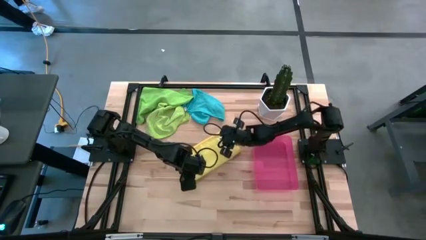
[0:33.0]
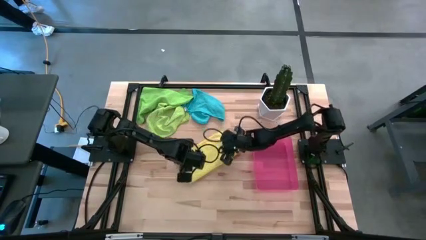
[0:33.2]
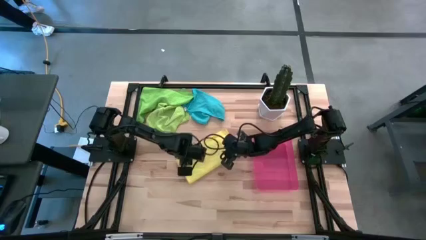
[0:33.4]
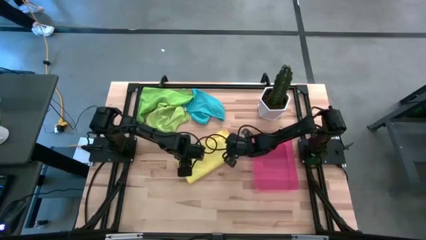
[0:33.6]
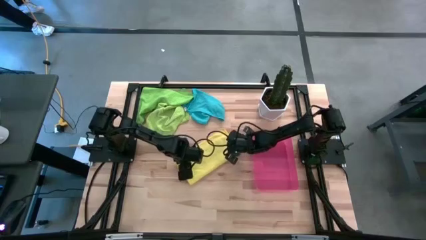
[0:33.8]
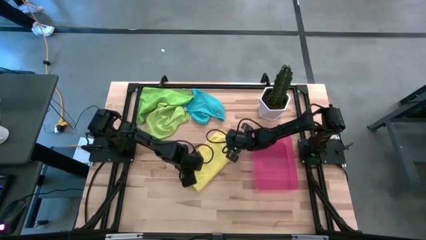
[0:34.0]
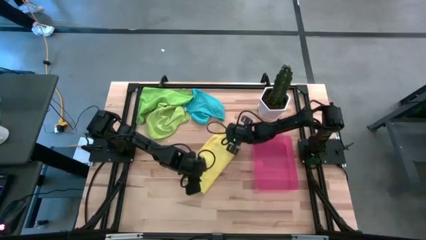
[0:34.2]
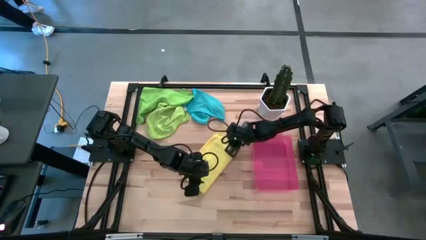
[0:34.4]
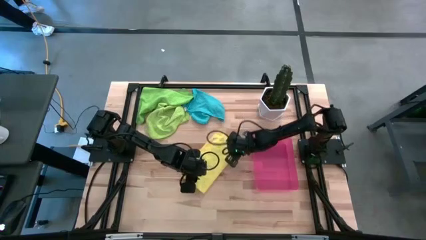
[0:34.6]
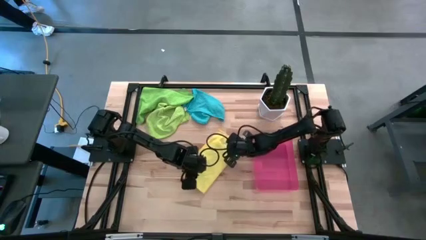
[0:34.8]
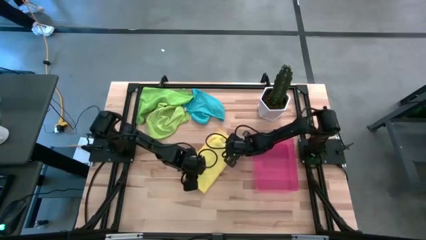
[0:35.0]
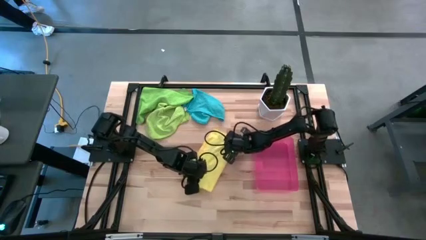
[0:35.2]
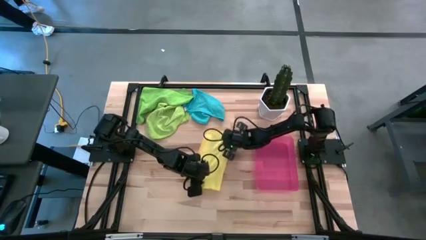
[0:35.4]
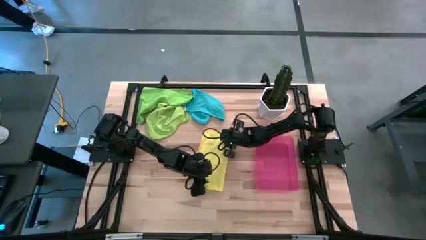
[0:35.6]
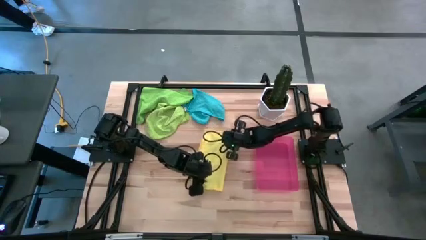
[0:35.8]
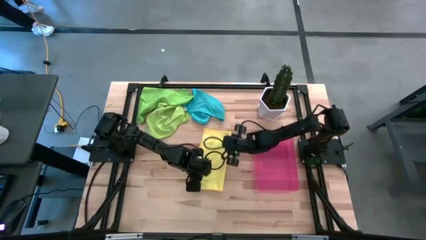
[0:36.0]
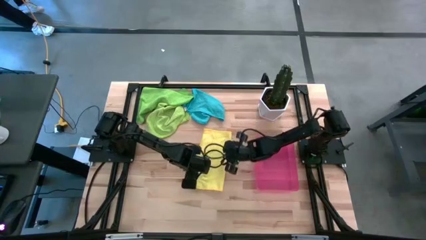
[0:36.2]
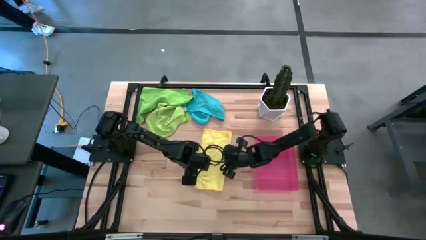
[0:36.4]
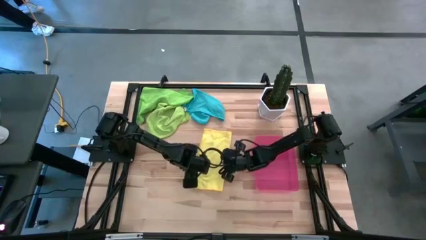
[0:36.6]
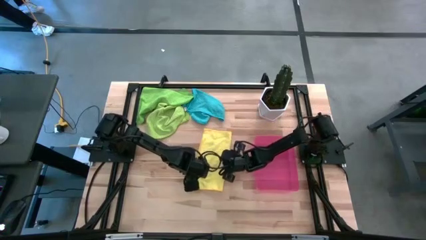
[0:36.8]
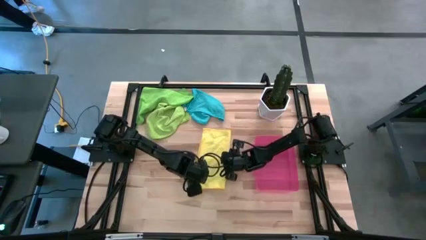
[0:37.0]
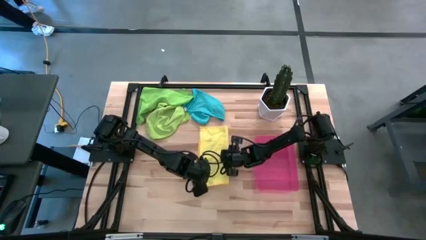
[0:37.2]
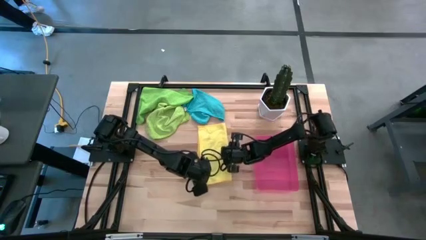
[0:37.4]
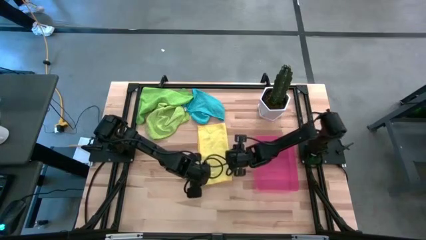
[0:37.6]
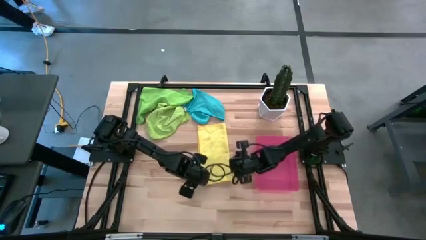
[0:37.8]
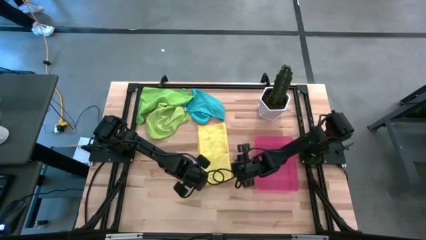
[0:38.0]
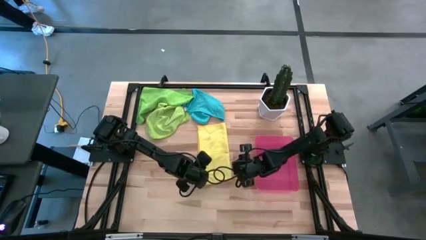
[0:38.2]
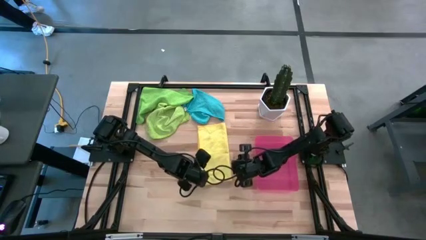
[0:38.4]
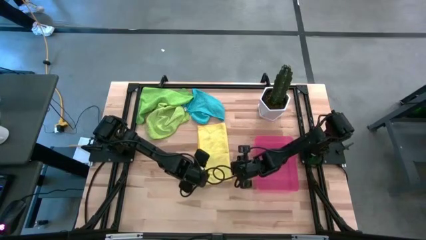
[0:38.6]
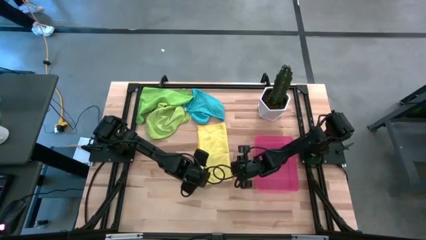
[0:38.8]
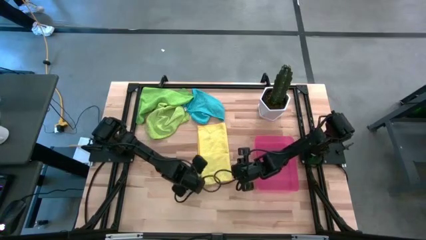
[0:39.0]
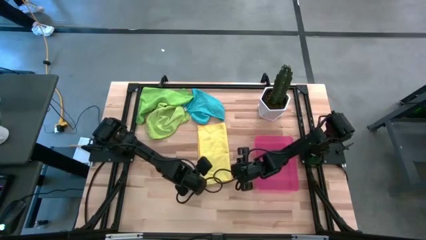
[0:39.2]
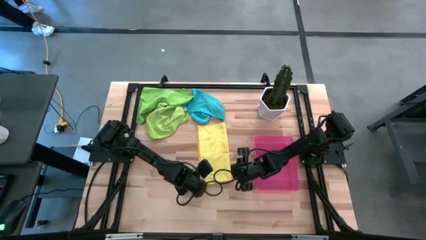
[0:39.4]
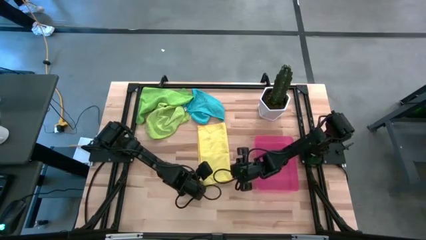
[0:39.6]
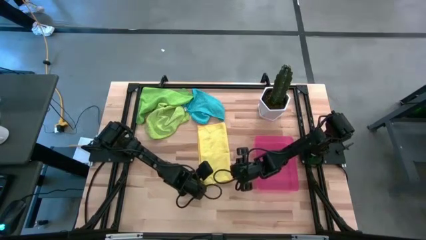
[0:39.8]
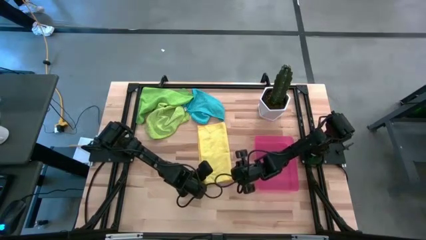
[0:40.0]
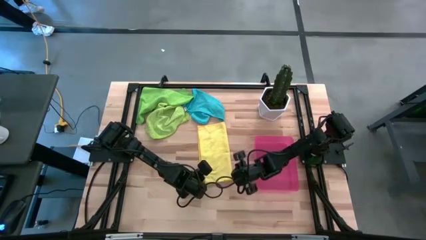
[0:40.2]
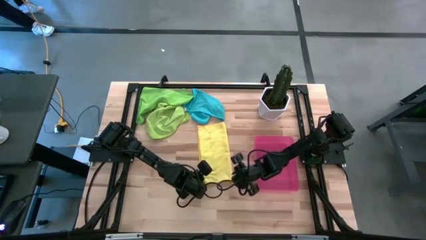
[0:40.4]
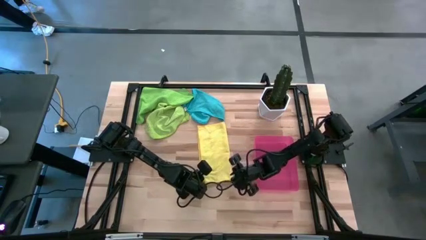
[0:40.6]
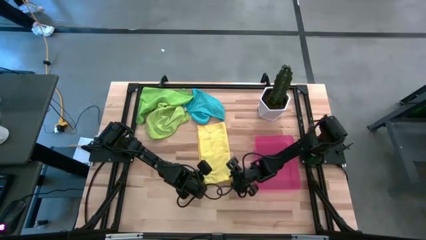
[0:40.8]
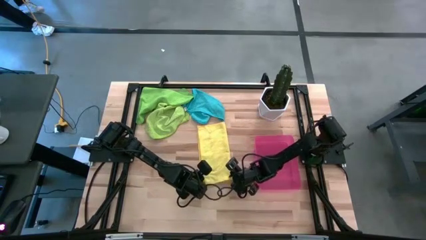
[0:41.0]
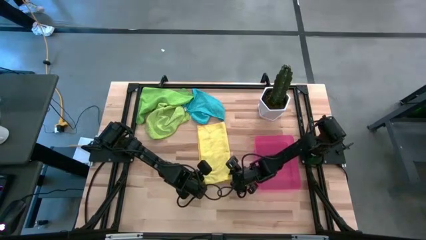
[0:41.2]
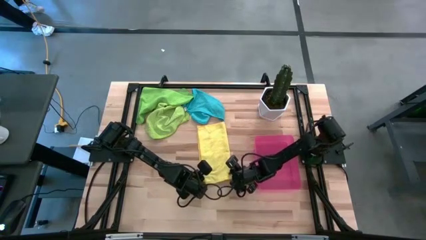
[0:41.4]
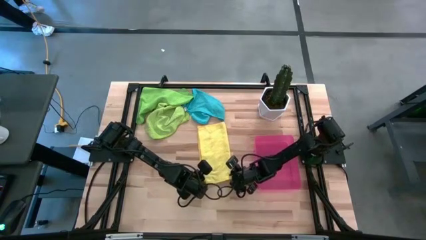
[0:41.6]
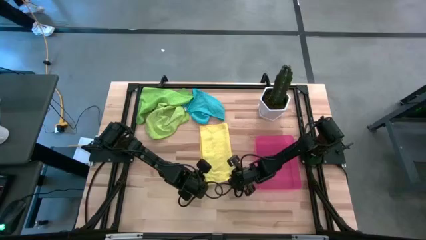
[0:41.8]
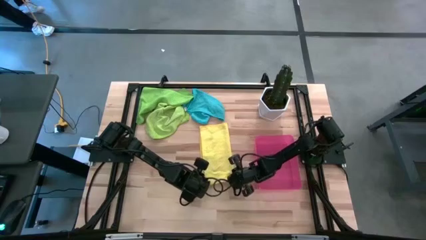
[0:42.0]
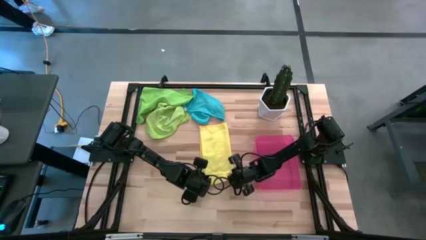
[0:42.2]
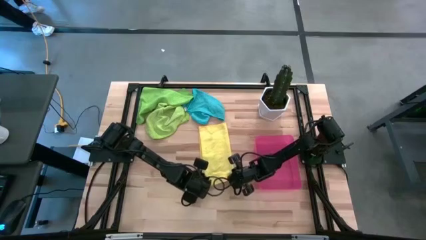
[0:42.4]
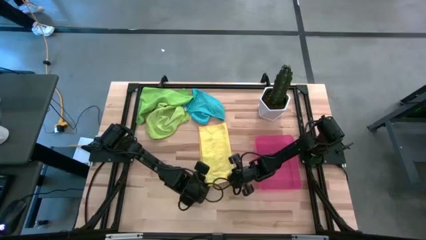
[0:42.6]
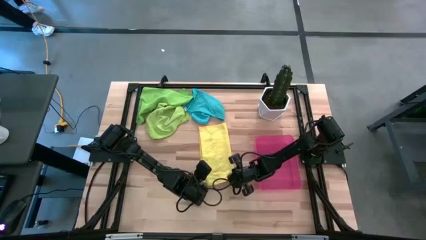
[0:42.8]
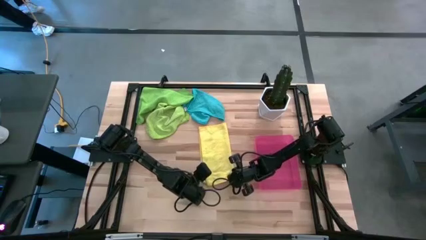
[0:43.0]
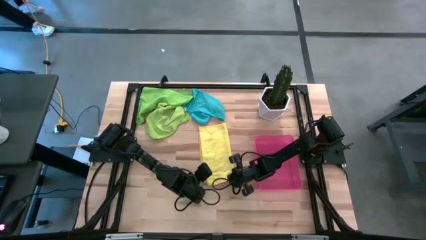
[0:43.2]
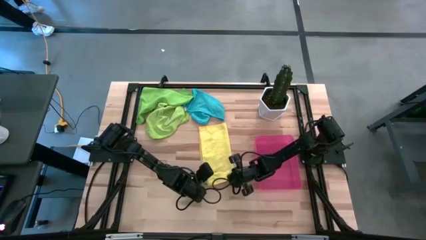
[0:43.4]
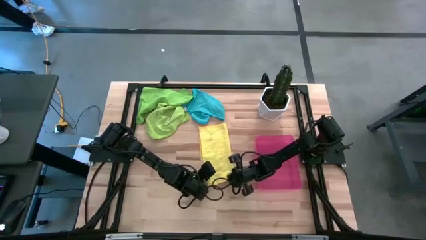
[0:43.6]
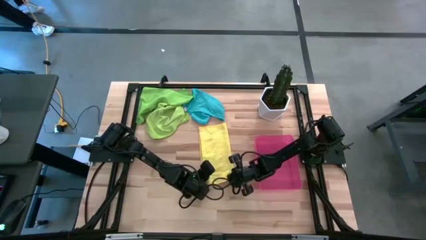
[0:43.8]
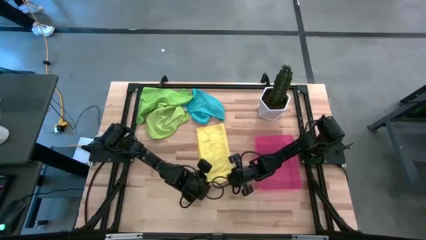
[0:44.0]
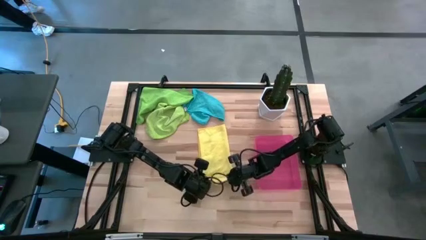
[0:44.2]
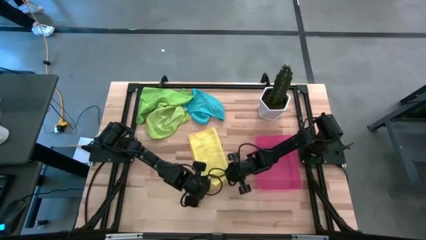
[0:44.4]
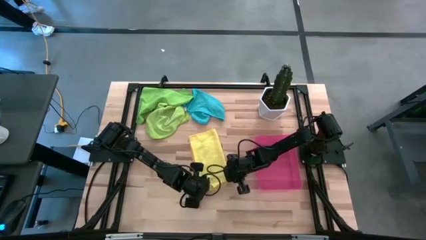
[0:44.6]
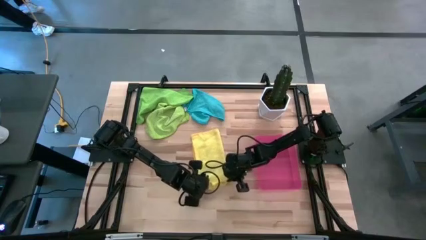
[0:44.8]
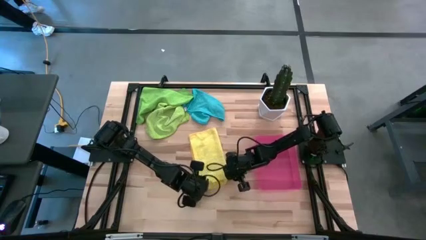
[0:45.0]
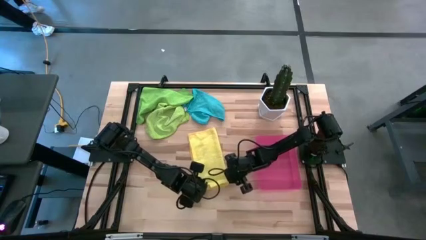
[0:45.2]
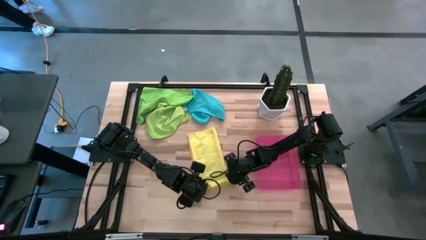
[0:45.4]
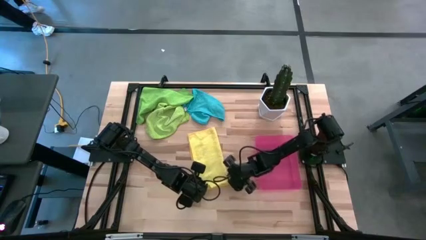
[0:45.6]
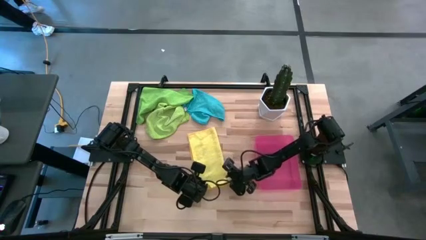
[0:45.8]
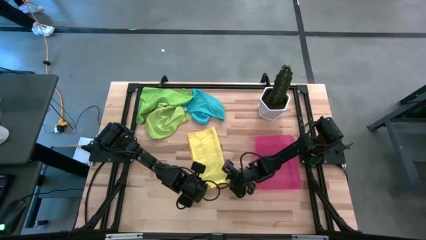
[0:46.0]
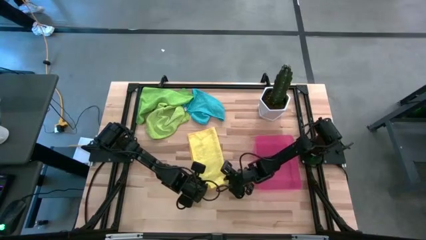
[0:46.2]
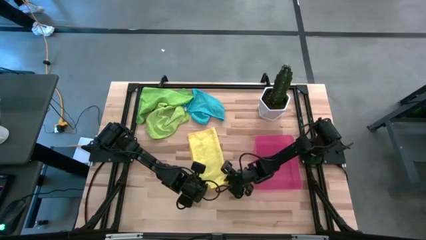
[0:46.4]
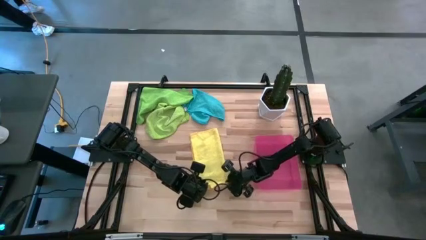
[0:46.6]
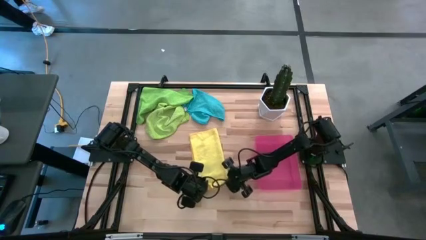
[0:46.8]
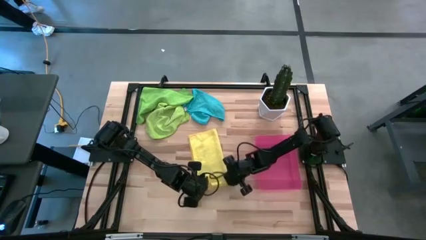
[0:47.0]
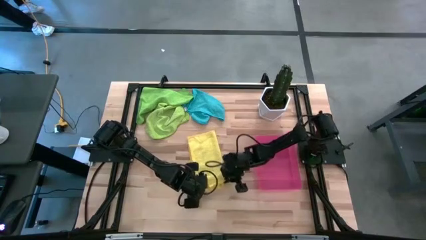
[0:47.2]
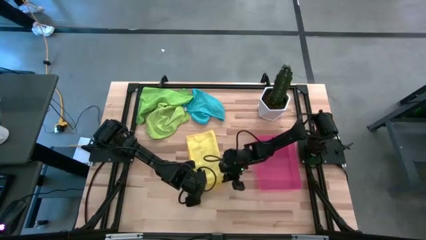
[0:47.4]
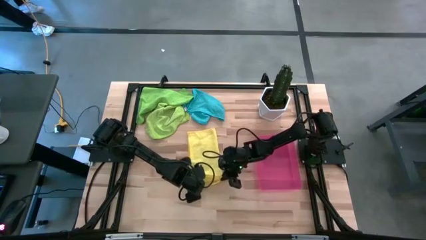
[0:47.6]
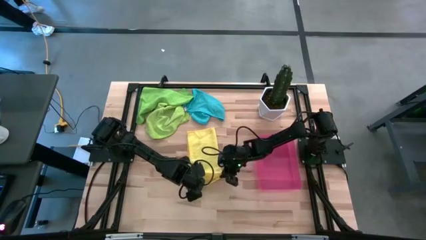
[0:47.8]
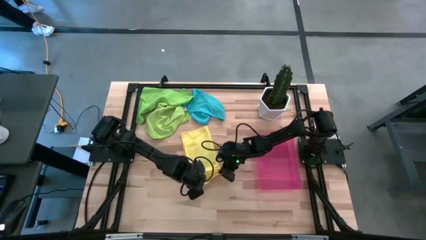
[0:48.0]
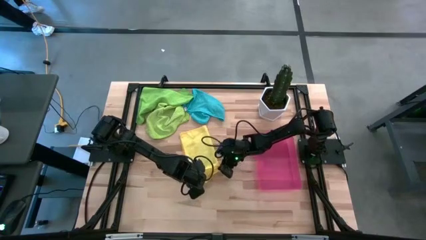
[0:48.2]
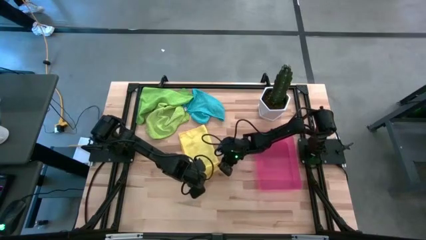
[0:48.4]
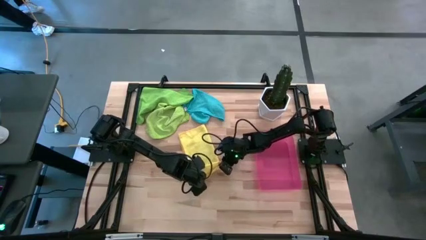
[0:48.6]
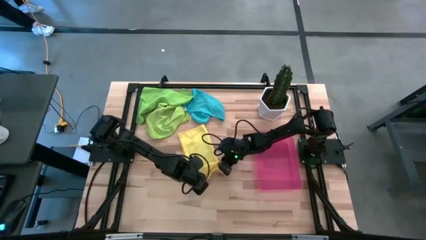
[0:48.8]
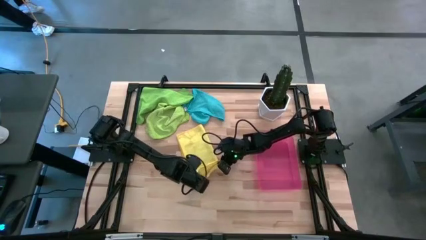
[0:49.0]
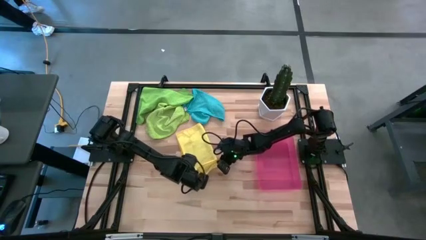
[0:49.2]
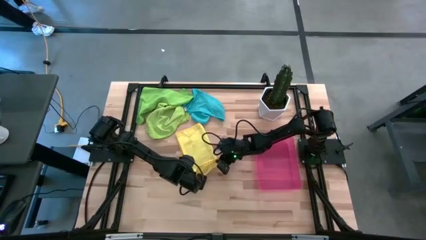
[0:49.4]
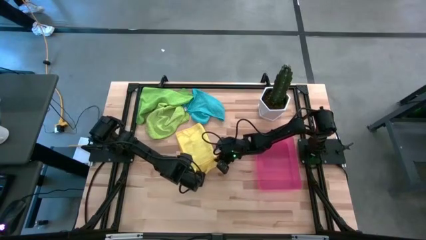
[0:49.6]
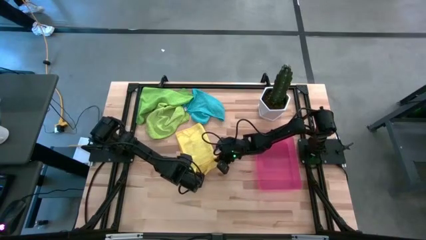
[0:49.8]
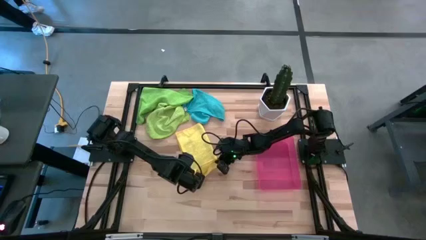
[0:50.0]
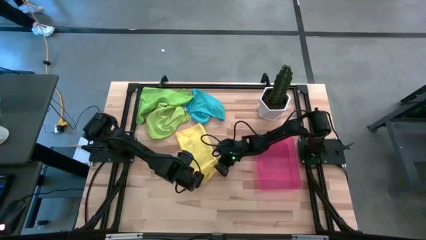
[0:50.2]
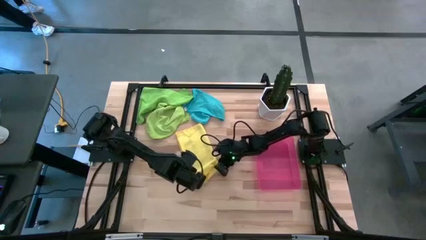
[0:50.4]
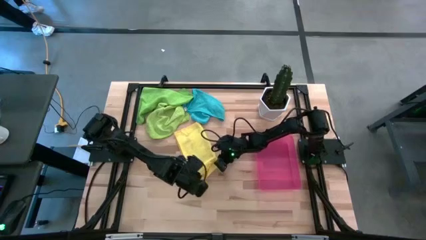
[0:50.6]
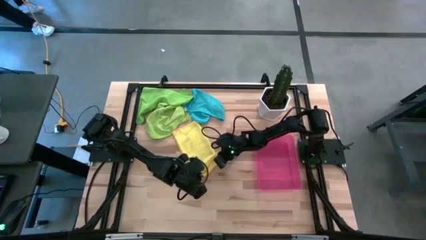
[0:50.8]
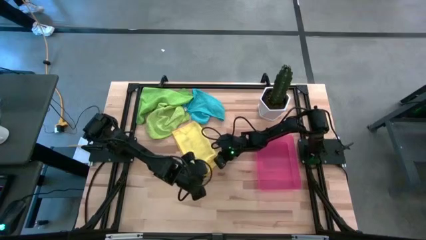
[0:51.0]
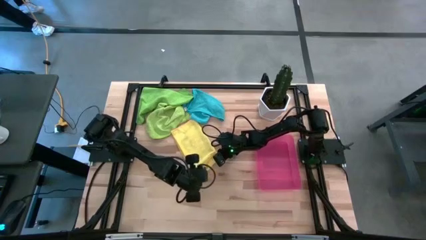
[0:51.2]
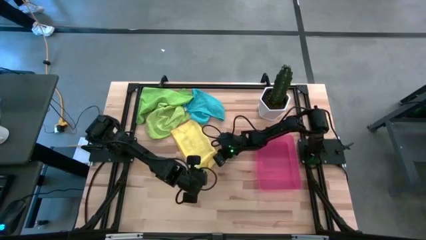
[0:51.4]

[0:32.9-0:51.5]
Task: Roll microfiber towels into tight, uniform cylinder then place into a basket
Roll the yellow microfiber towel
